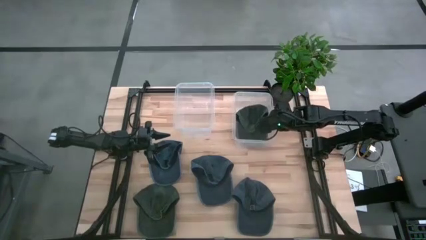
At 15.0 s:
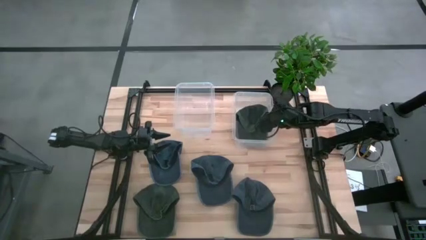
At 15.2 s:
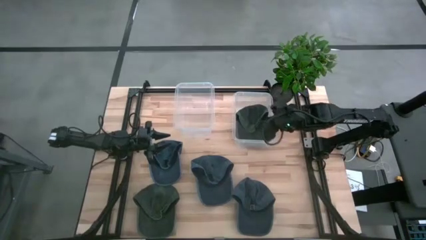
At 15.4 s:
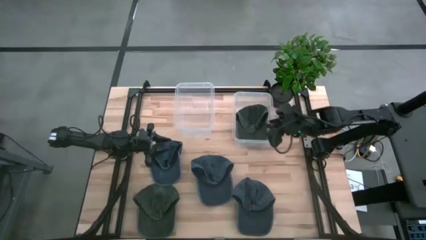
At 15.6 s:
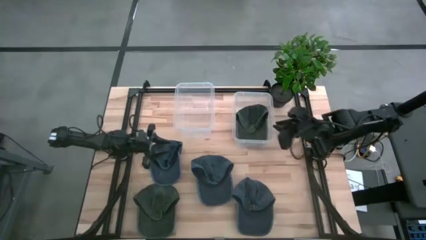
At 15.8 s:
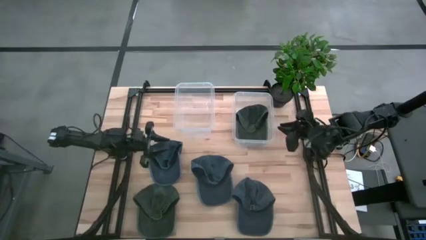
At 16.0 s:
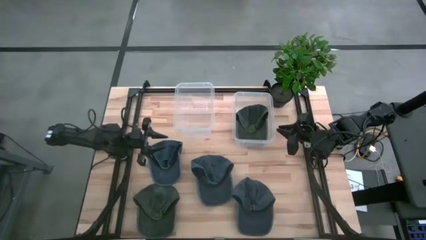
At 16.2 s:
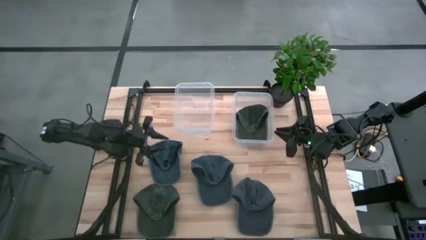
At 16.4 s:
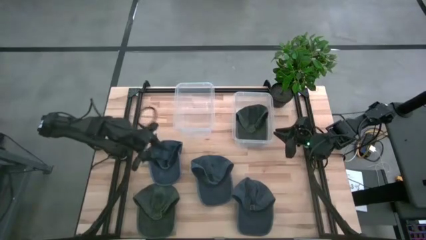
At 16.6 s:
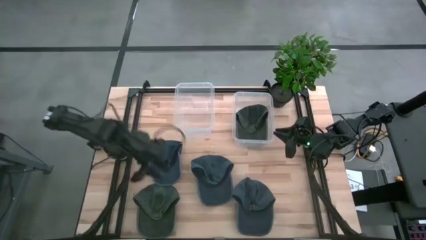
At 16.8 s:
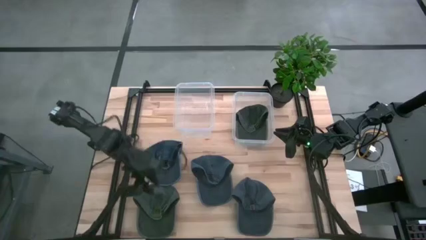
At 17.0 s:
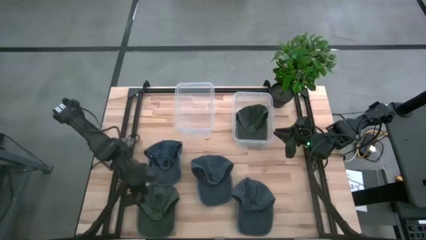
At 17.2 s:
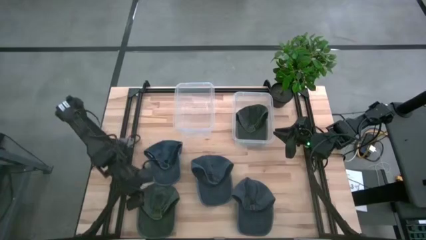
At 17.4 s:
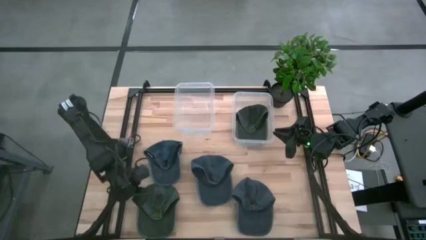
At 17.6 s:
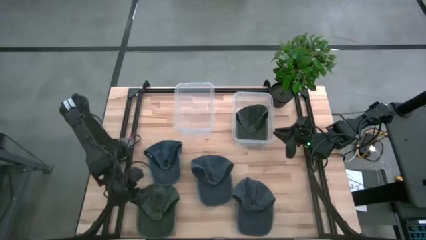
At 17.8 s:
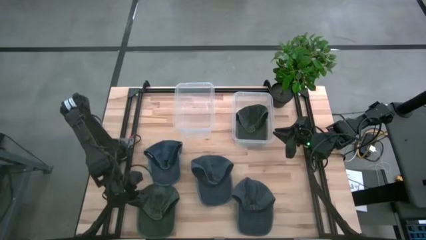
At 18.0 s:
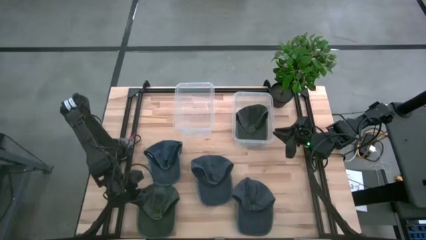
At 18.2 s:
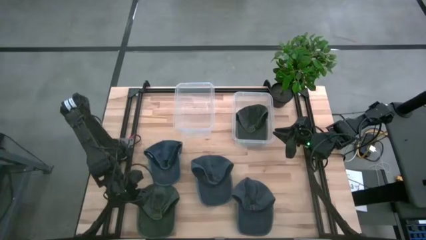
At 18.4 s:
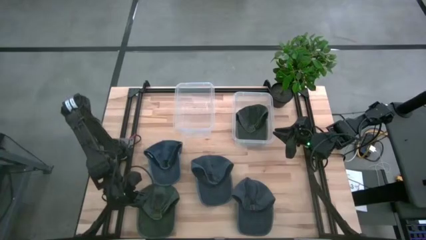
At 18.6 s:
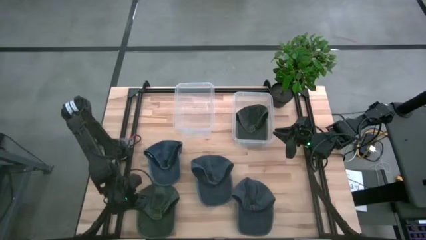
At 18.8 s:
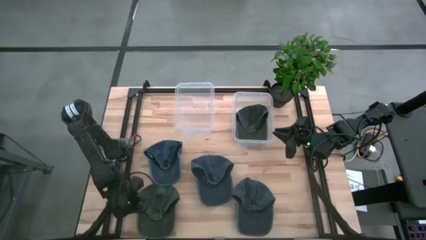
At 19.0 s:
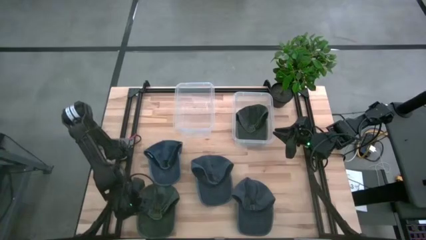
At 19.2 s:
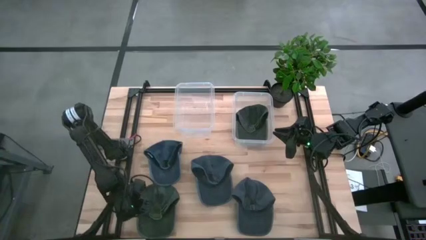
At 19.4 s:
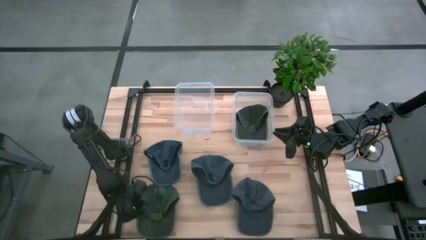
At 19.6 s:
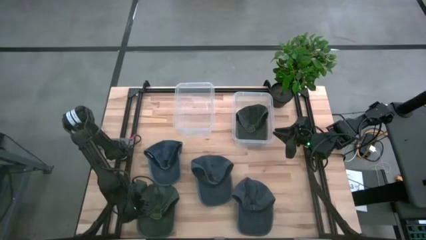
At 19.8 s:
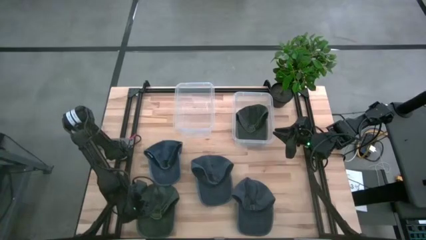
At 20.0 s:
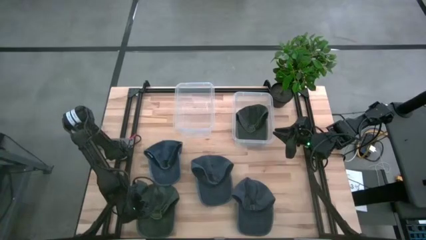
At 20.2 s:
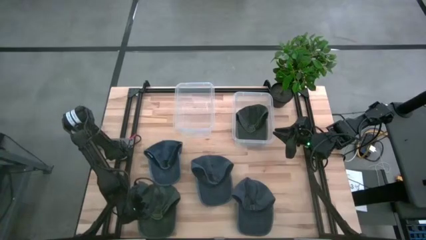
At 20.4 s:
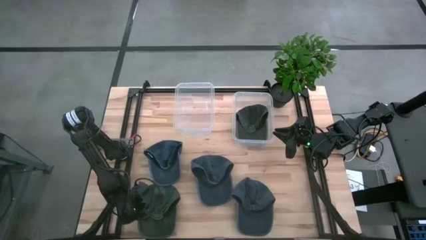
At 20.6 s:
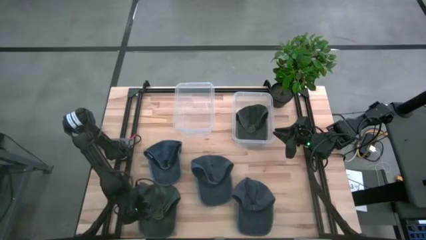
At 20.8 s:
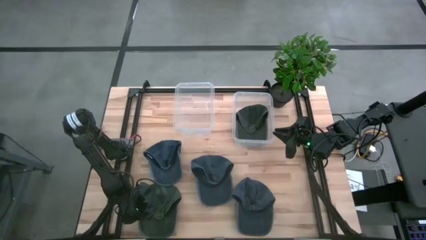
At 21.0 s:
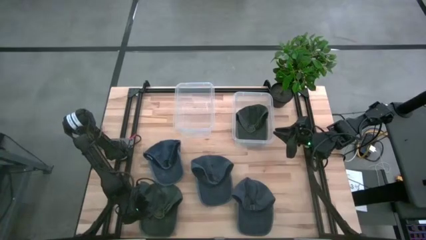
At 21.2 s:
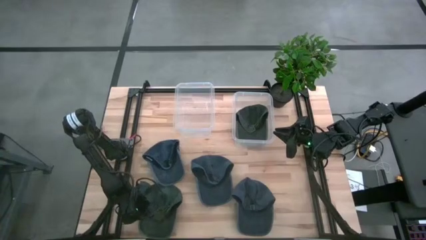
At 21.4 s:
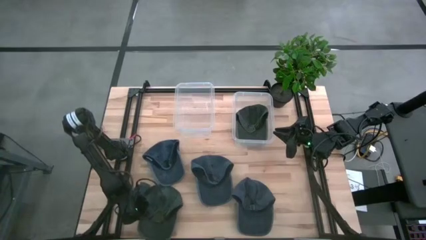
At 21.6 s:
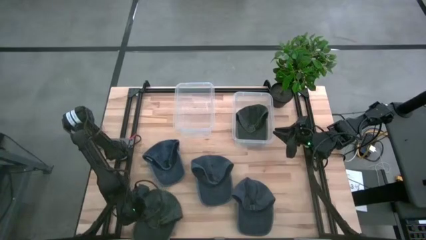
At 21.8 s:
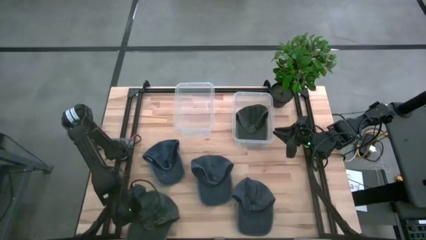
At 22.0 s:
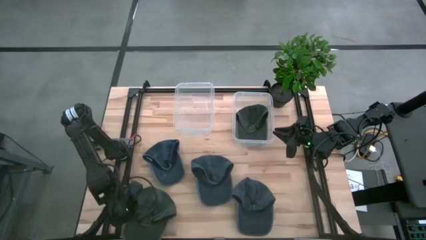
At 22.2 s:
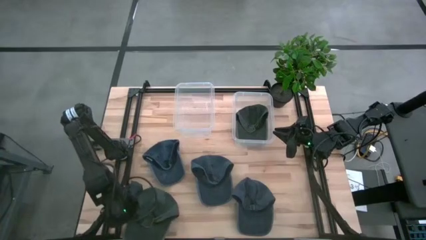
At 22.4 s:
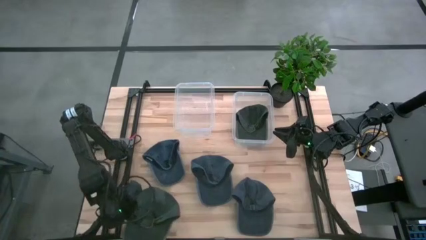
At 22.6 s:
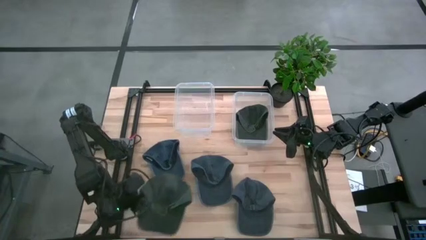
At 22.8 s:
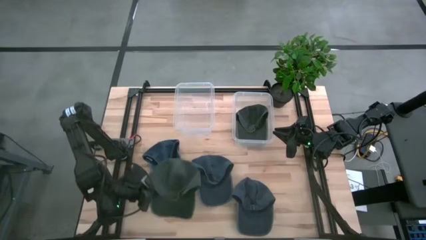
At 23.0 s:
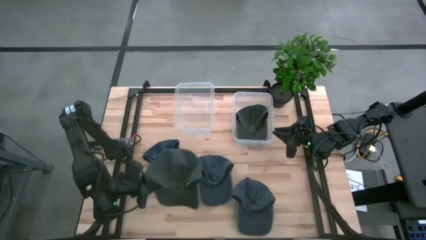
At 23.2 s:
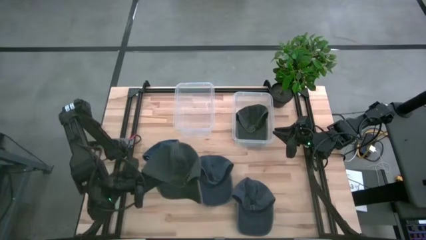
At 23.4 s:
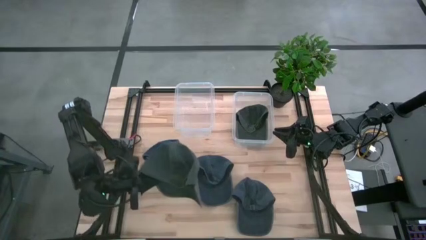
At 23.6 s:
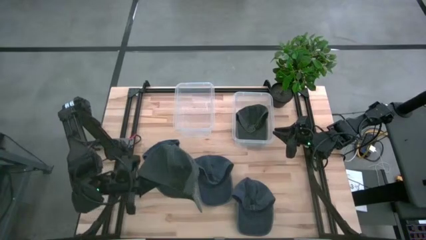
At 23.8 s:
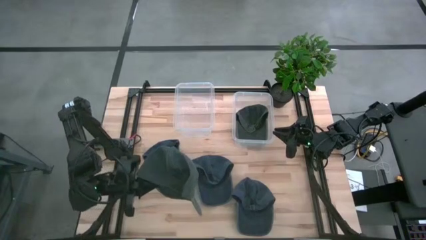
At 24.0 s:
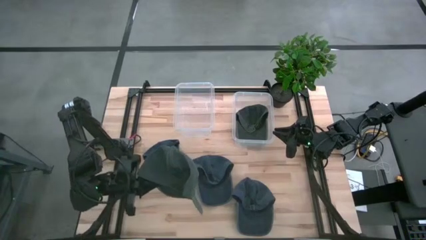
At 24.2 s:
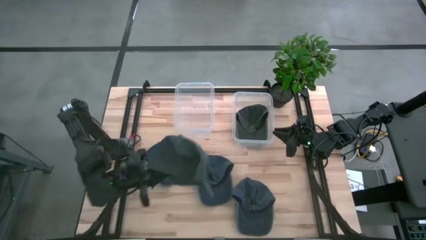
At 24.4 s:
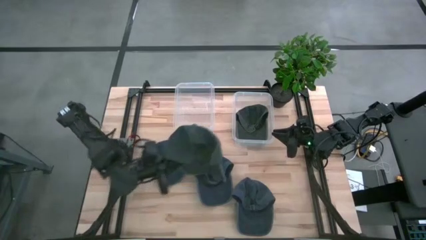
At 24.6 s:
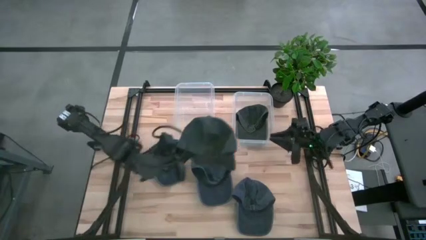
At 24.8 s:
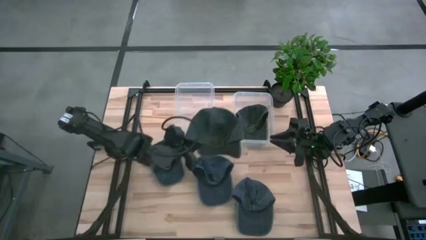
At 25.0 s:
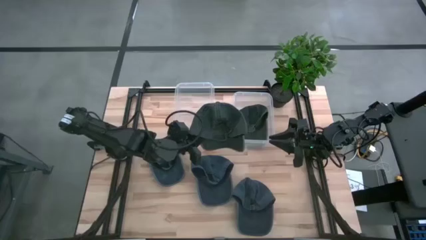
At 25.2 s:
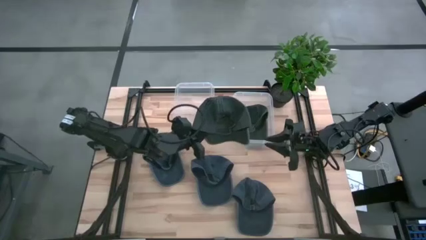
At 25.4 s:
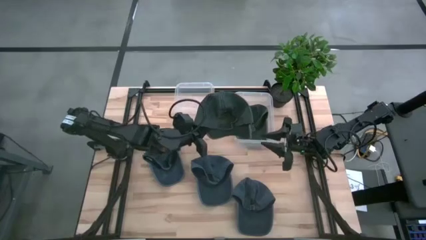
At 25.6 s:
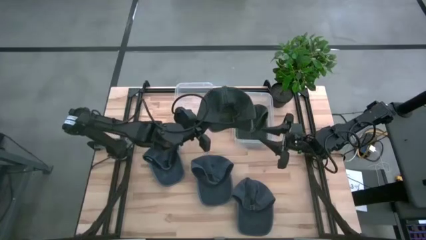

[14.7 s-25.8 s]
Task: Pick & Place hat
Put the green cap into the right transparent bin
